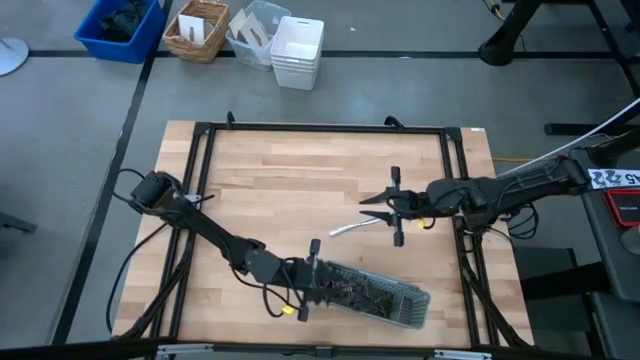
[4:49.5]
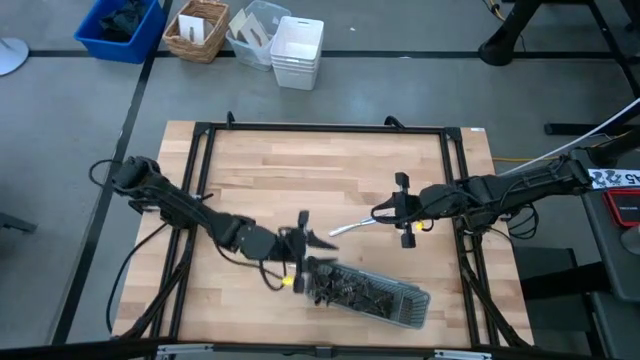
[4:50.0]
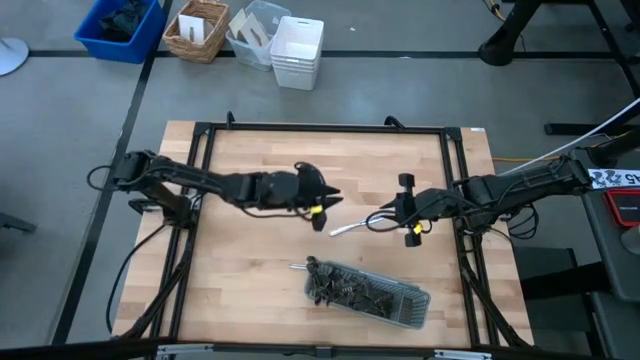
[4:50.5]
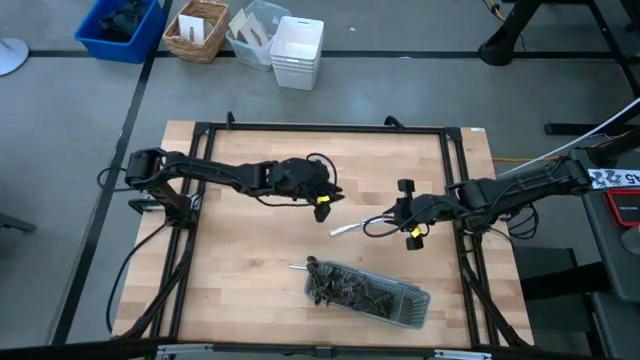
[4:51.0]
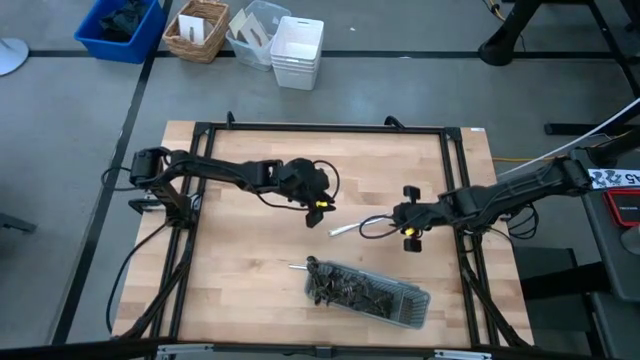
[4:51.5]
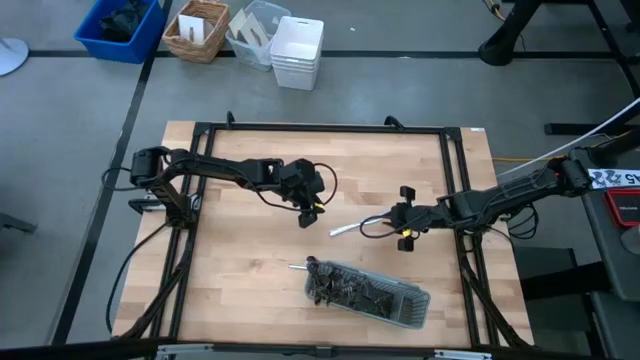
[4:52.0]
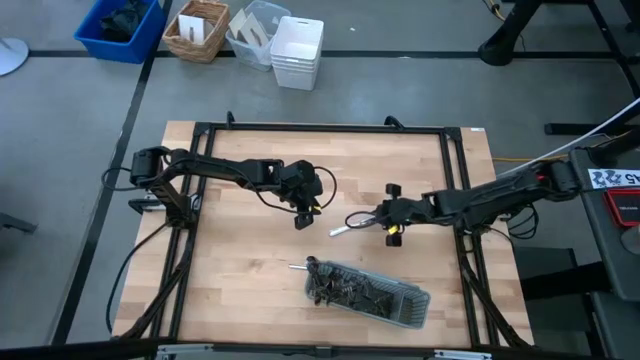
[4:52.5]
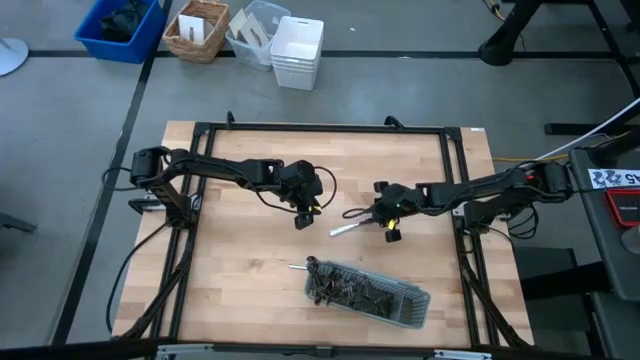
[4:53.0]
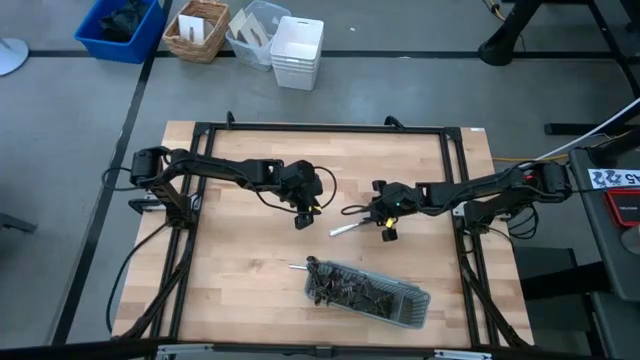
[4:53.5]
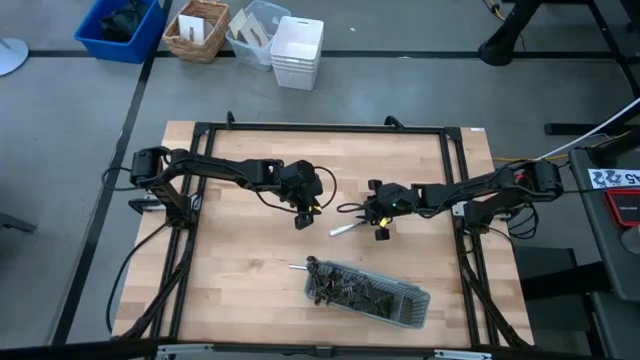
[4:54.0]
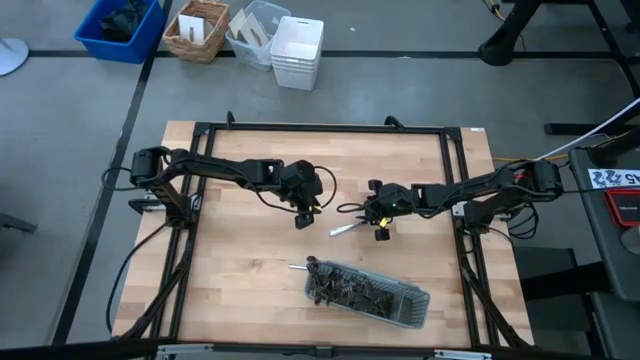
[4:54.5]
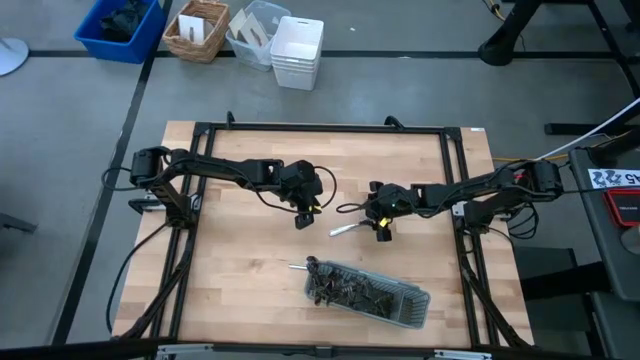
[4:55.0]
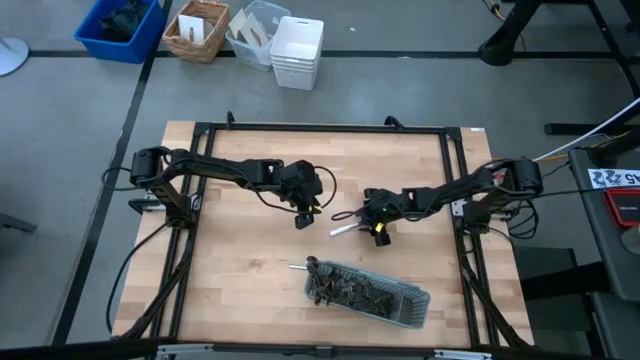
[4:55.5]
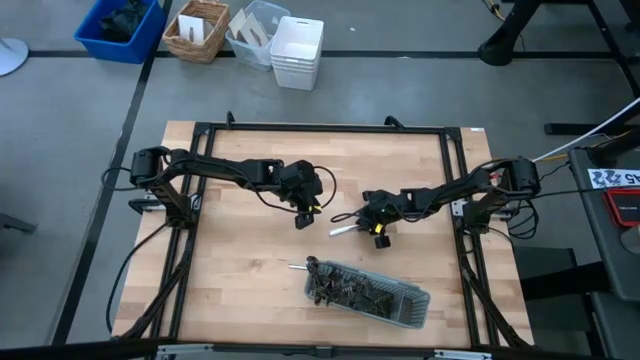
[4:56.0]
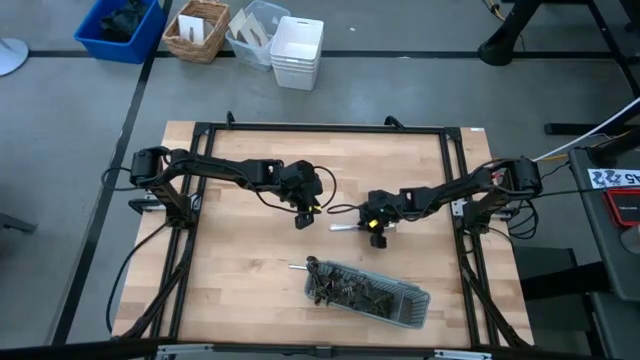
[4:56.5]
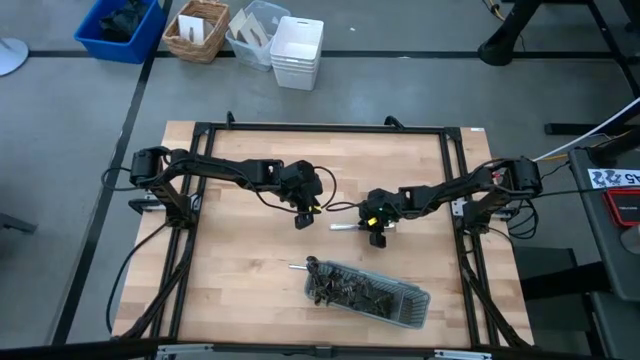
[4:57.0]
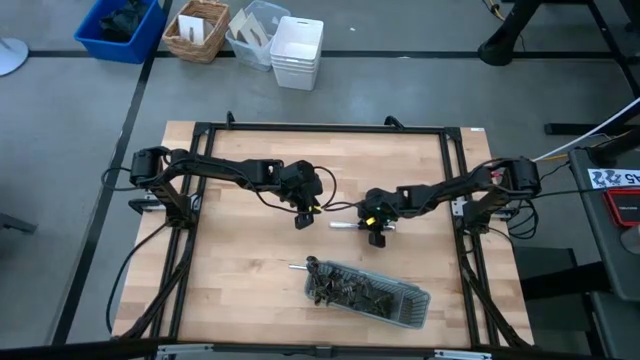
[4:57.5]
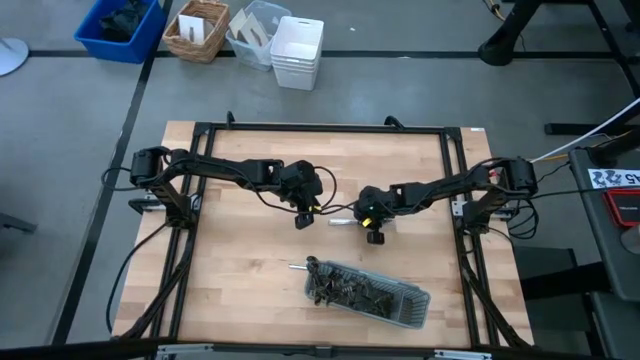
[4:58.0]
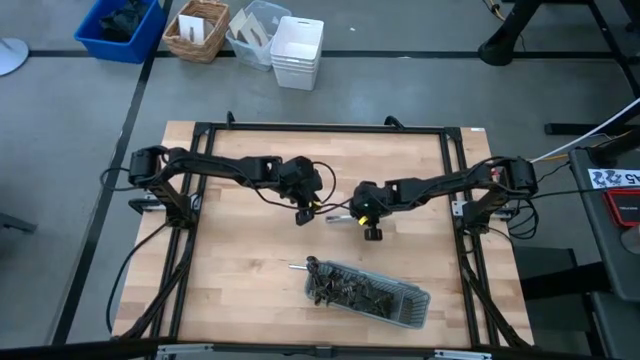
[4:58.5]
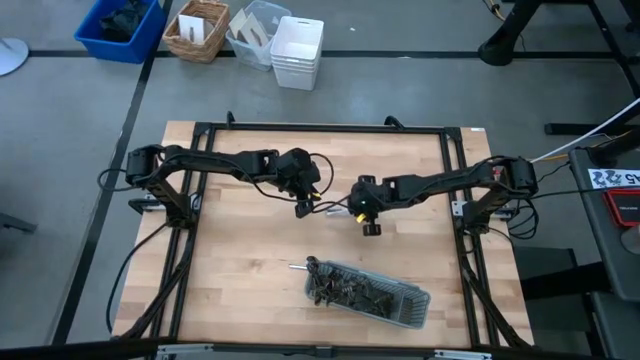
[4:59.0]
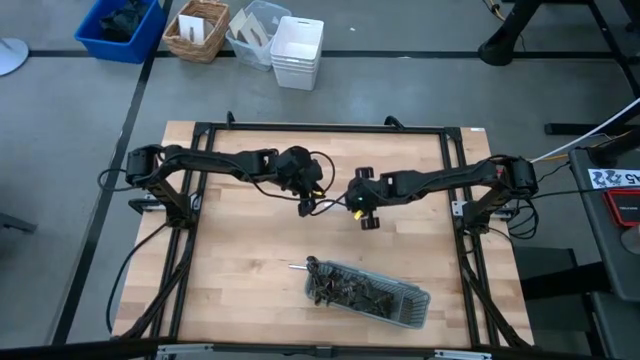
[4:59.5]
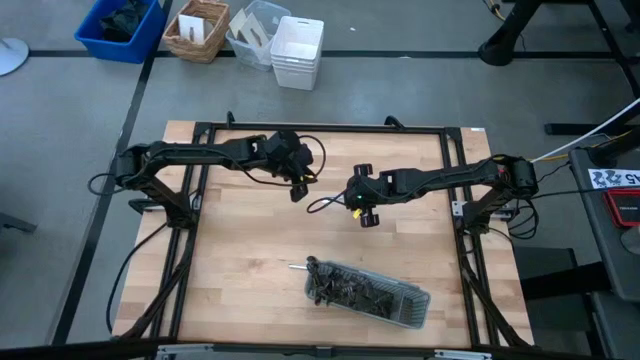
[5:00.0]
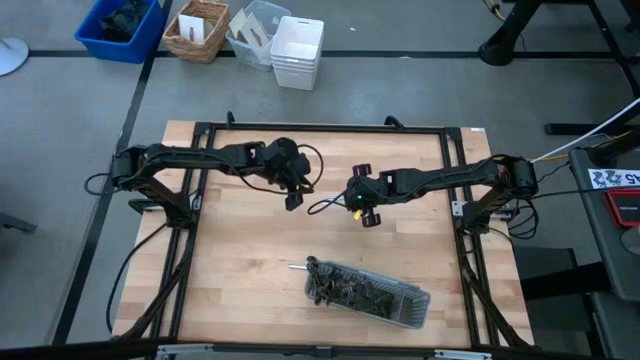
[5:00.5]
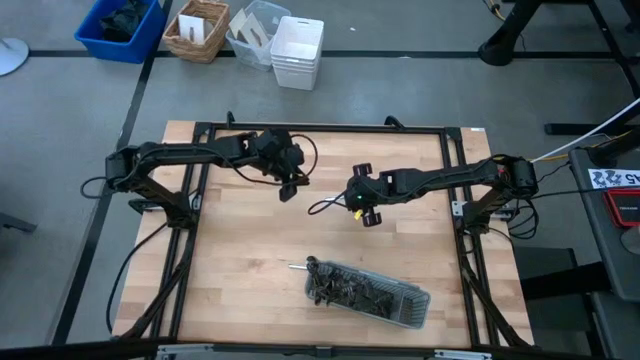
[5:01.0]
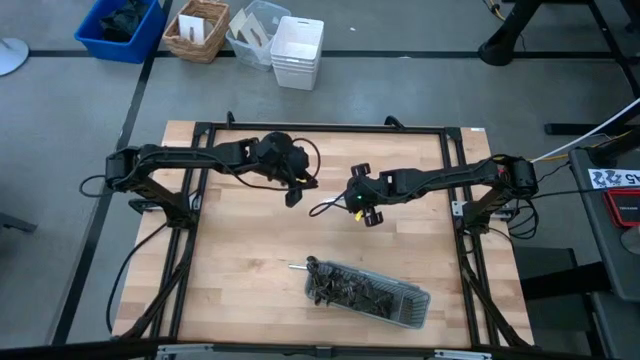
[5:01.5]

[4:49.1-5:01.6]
Task: Sort silverware
Put the knife into the gray silverware rack

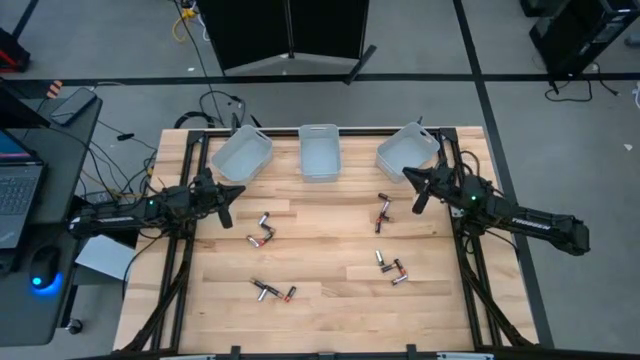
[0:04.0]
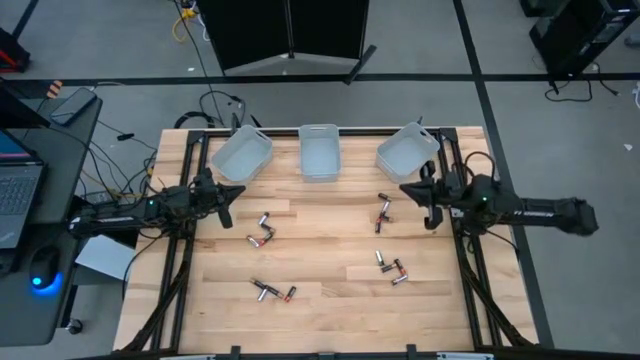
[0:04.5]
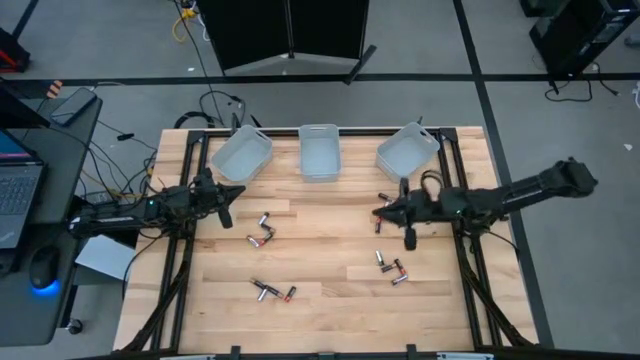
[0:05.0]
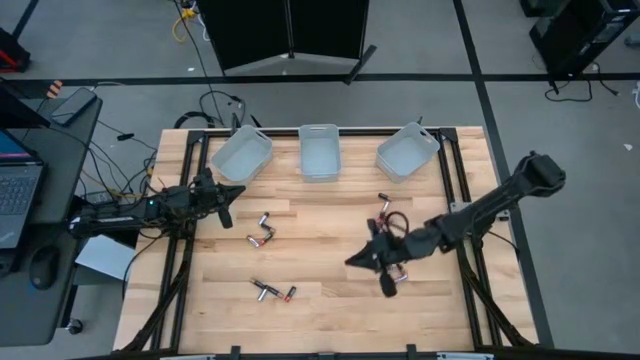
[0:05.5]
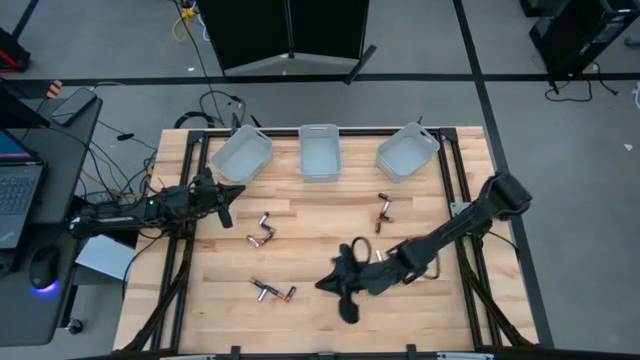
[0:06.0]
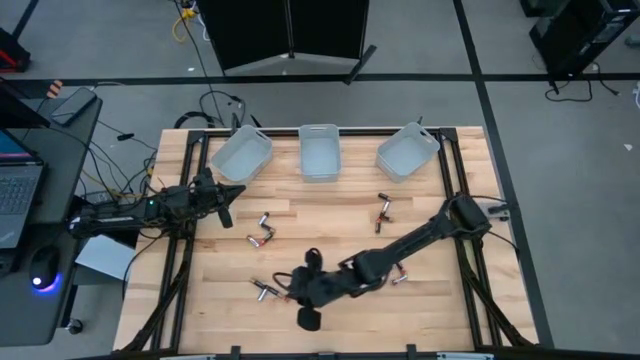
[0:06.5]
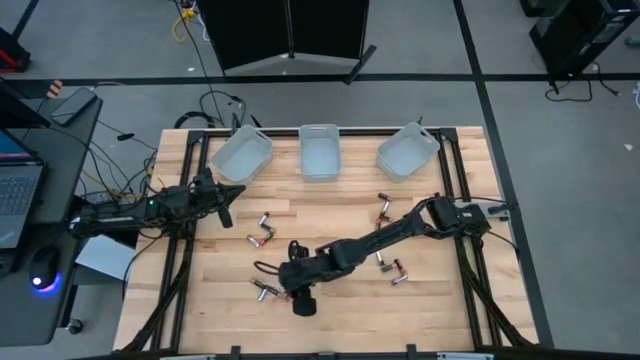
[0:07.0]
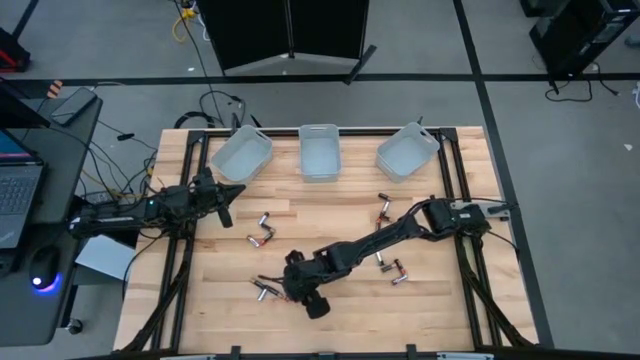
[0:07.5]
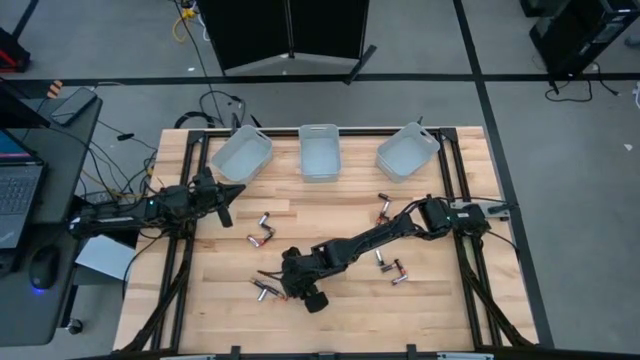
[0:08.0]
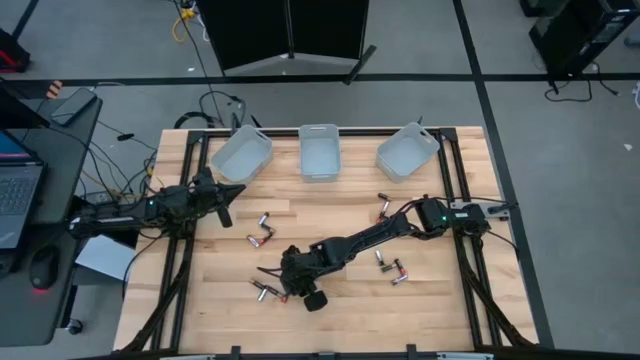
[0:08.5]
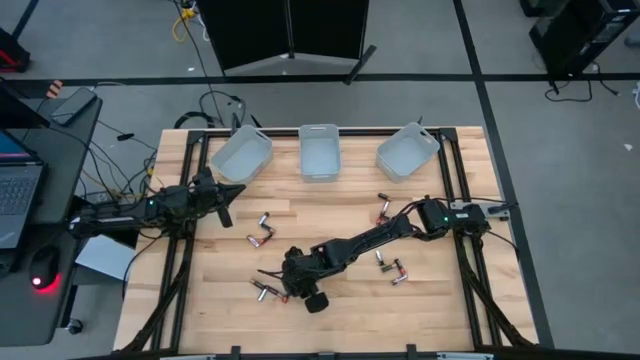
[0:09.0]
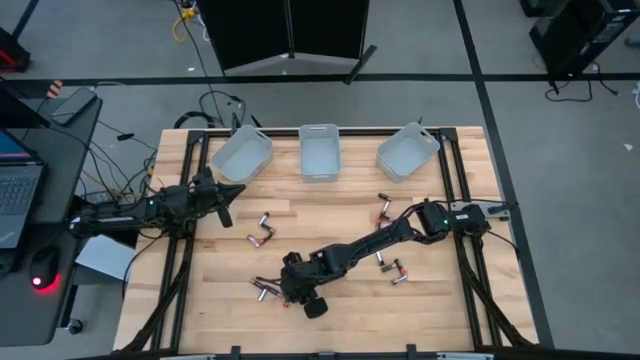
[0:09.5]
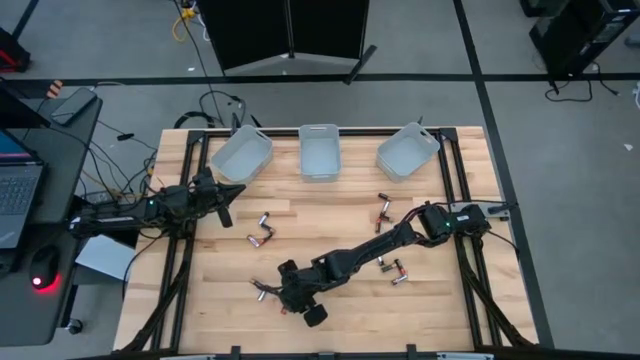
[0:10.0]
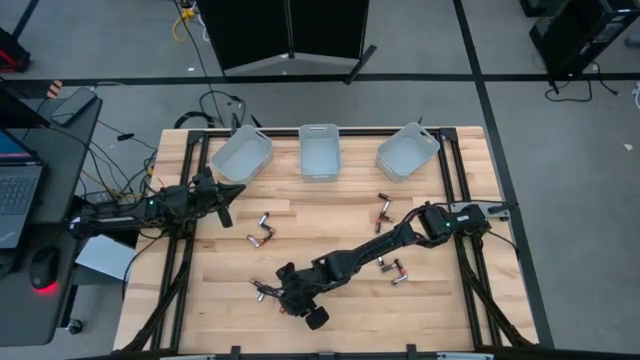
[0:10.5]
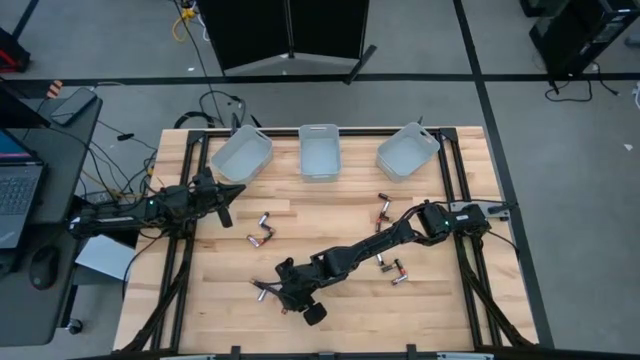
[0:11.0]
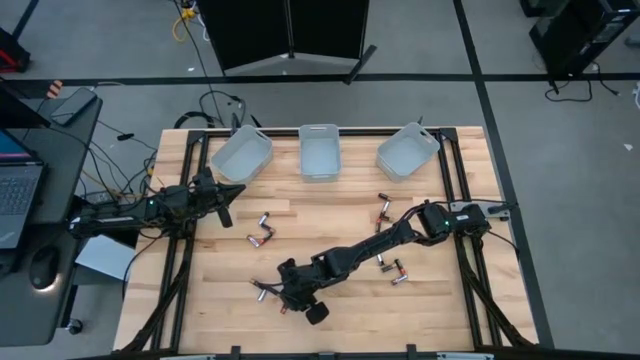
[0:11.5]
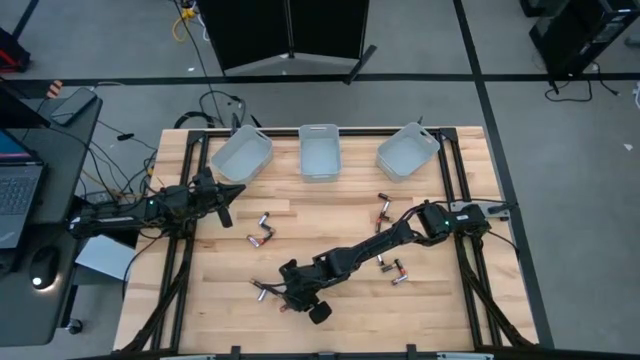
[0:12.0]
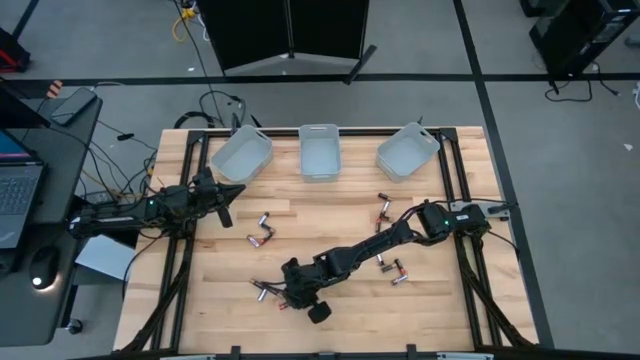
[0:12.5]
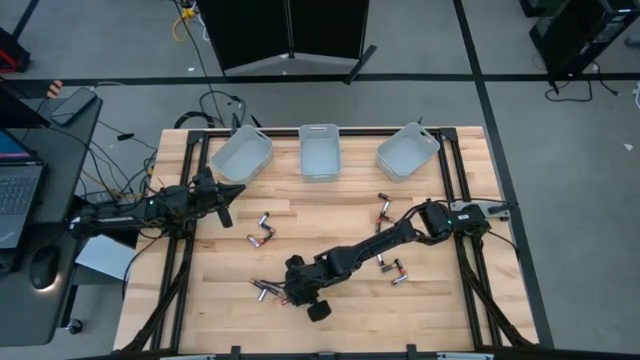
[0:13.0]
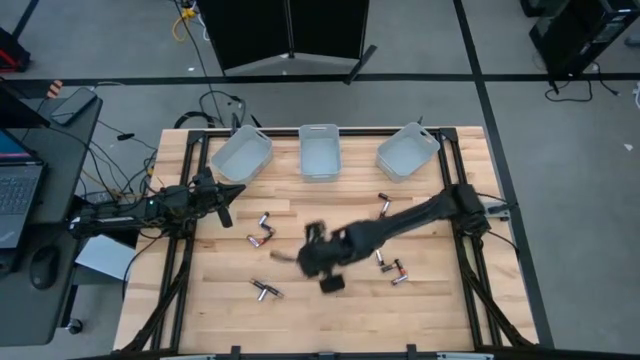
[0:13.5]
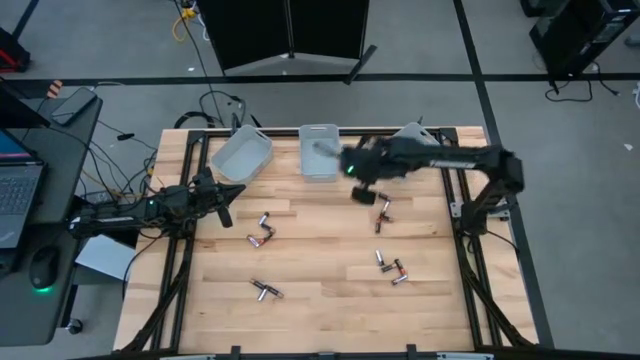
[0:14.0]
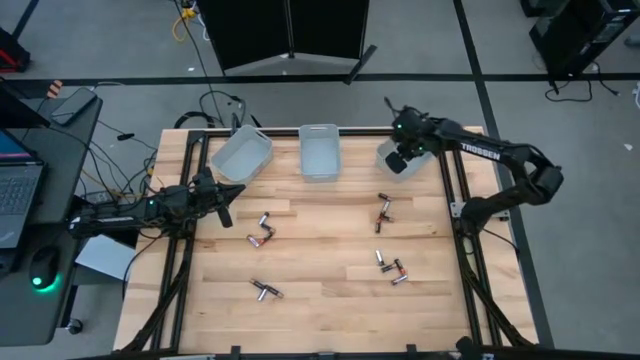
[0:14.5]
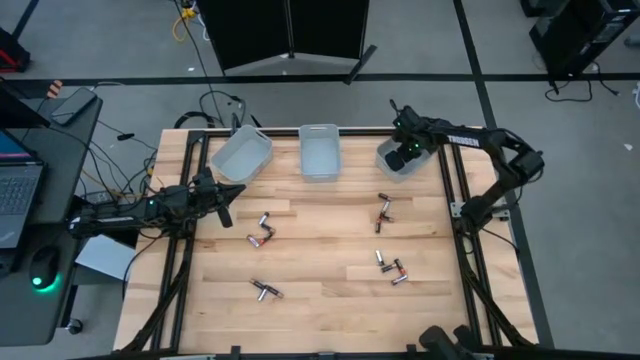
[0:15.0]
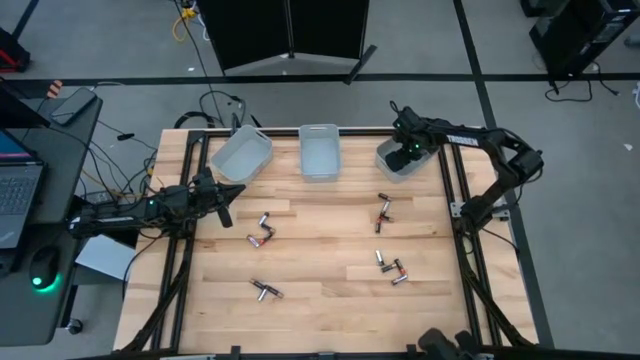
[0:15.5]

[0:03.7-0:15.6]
Task: Sort batteries
Put the red battery into the right gray bin
